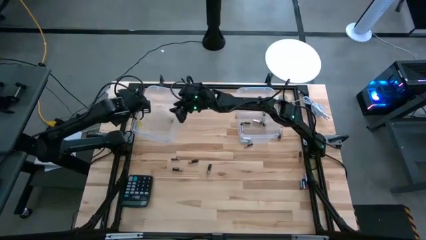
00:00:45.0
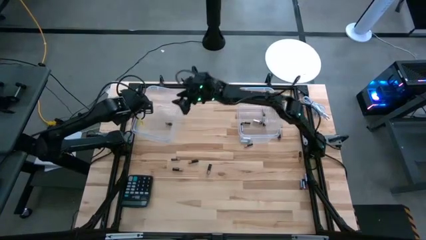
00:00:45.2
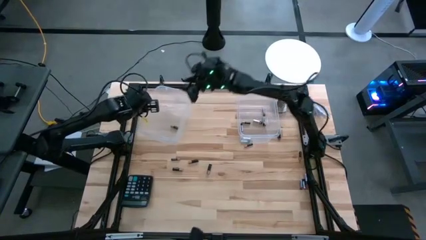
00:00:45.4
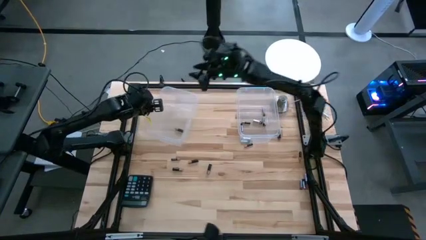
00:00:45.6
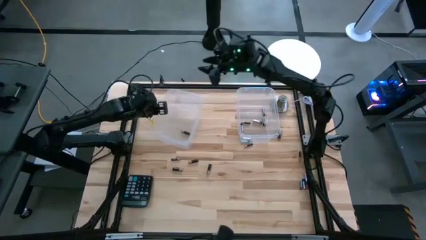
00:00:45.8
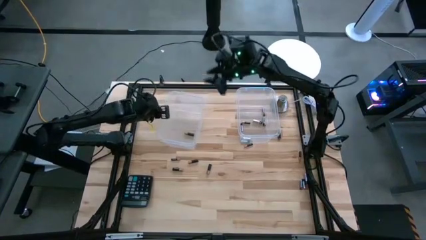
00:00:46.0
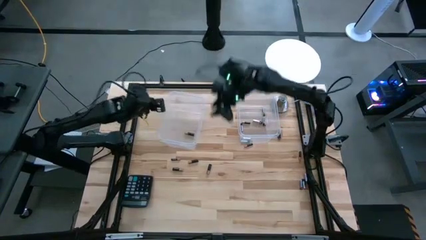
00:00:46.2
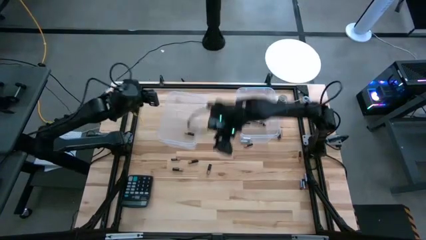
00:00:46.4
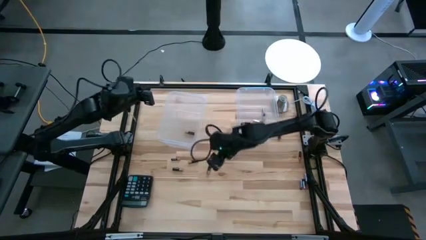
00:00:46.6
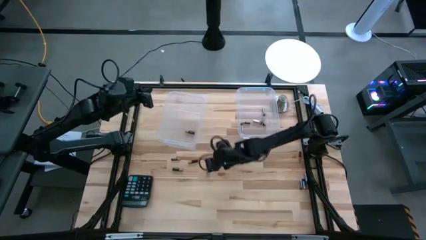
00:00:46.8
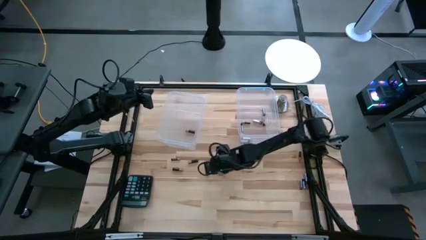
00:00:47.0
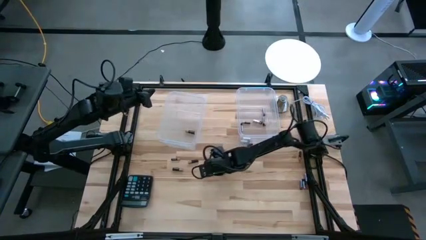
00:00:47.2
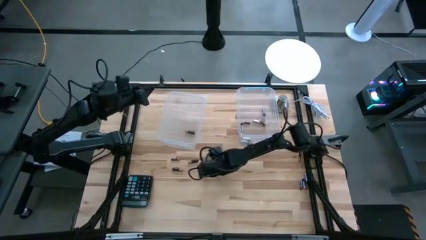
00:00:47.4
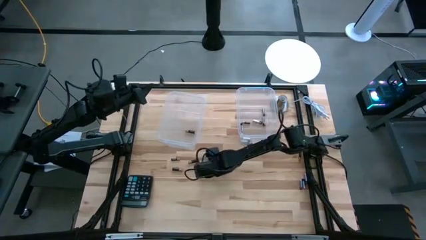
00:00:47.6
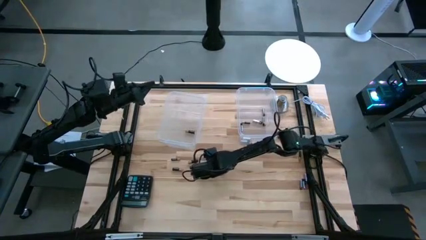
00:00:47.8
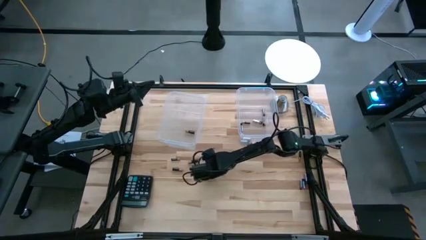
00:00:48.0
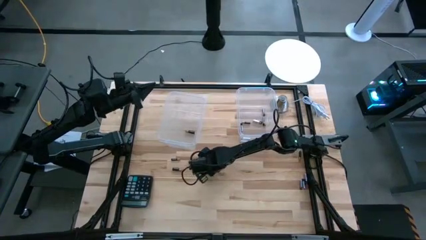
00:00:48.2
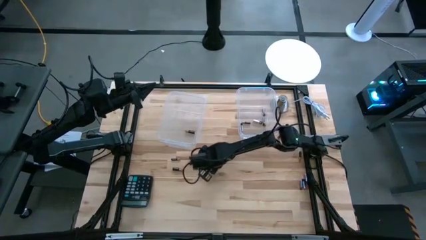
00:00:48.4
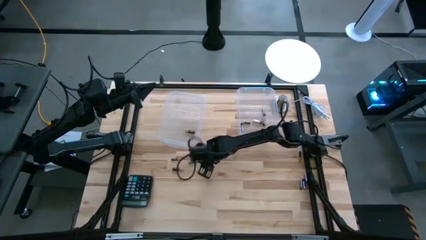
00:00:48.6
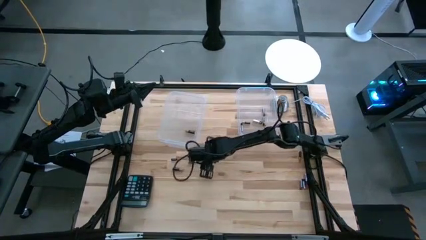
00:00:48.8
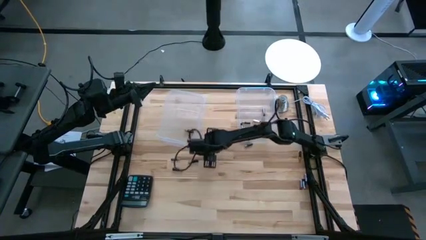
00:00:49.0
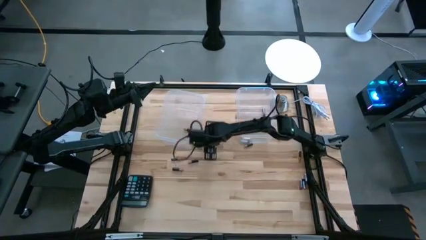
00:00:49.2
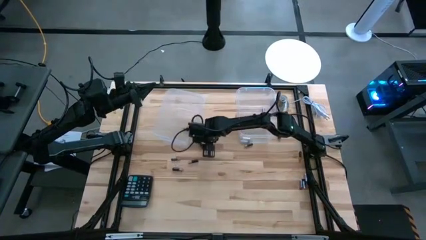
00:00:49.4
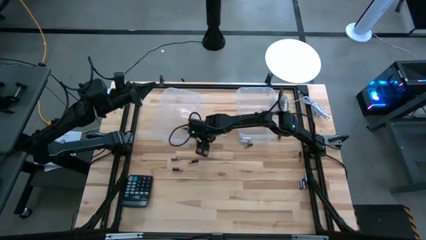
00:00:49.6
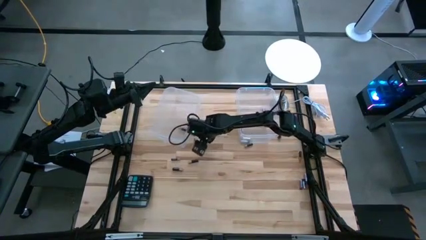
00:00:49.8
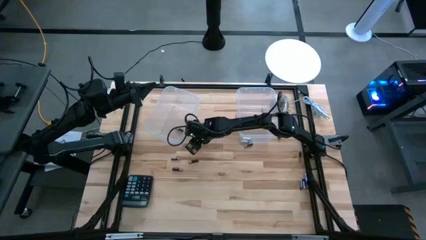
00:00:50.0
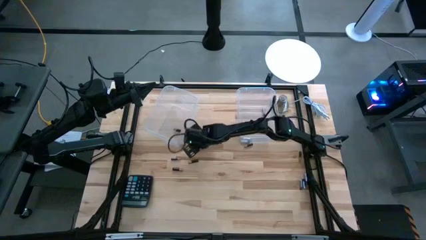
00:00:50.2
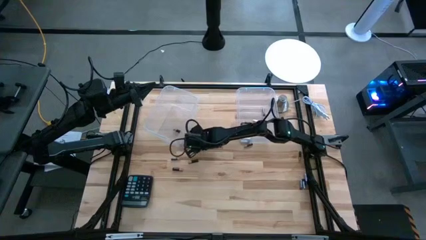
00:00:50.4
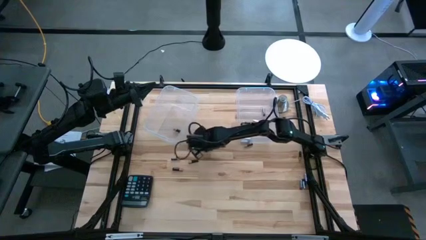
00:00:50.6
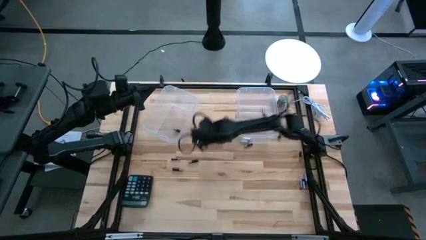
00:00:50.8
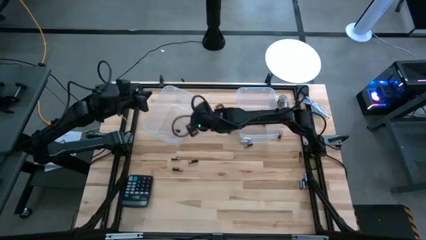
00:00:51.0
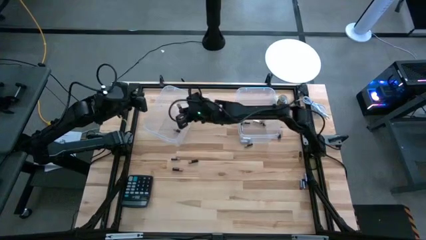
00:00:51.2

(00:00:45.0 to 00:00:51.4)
Task: Sort batteries
Put black battery into the left transparent bin

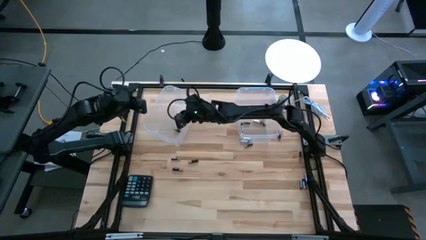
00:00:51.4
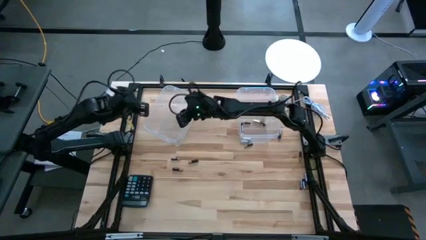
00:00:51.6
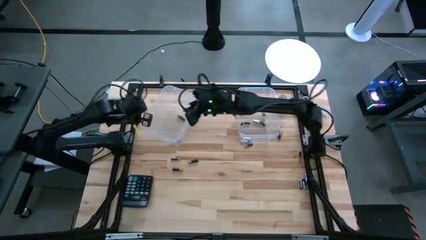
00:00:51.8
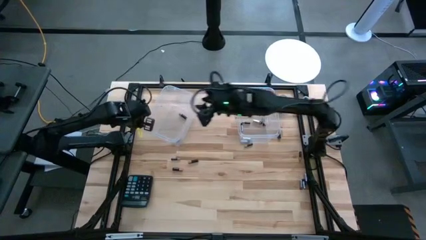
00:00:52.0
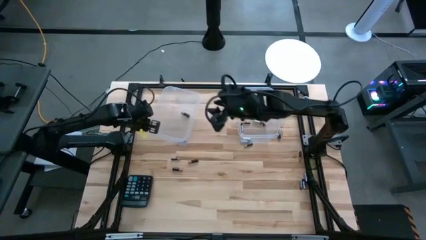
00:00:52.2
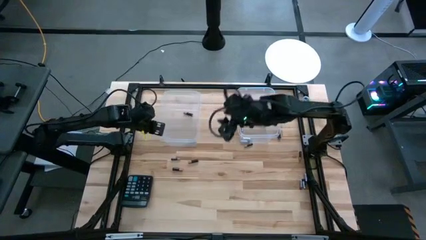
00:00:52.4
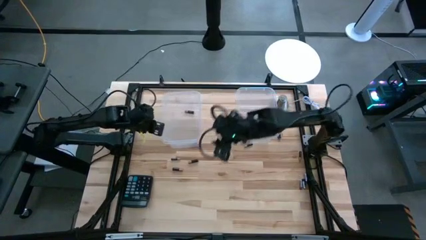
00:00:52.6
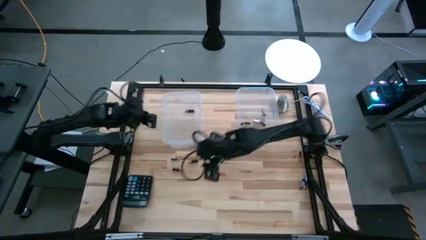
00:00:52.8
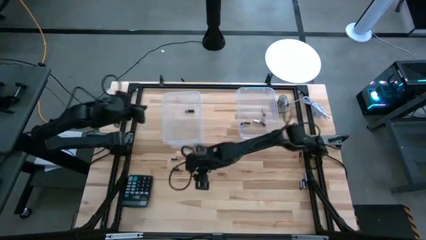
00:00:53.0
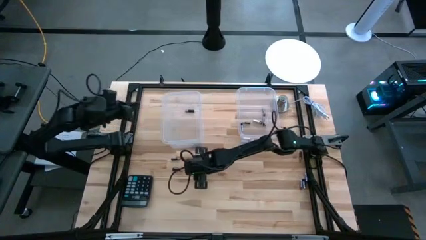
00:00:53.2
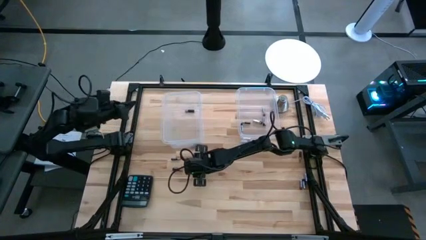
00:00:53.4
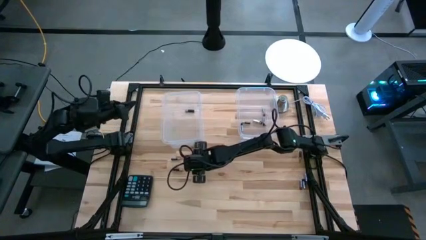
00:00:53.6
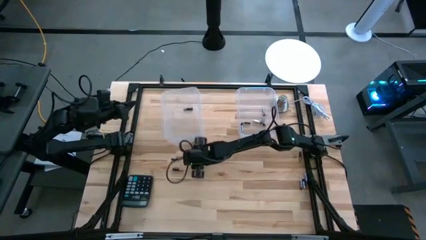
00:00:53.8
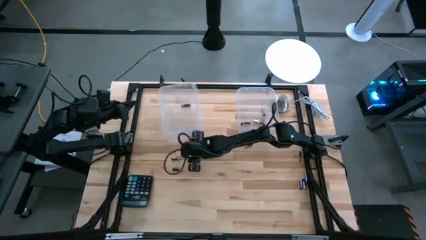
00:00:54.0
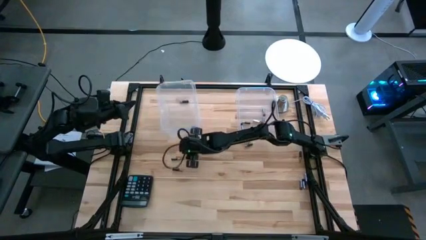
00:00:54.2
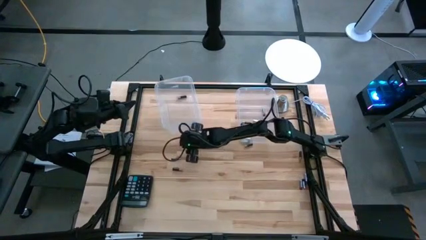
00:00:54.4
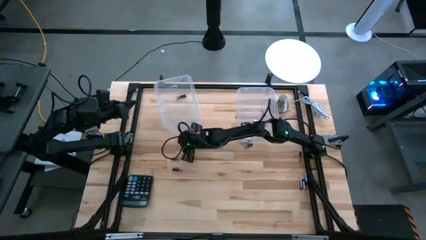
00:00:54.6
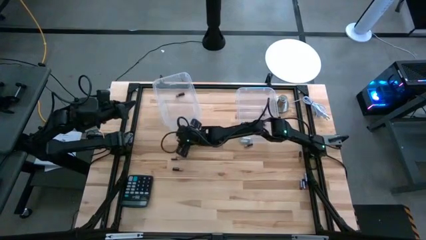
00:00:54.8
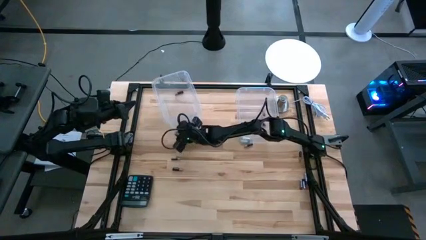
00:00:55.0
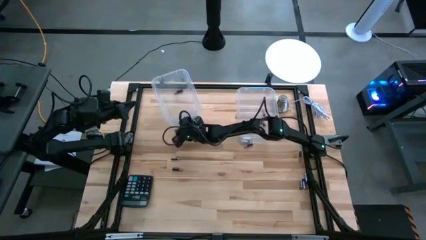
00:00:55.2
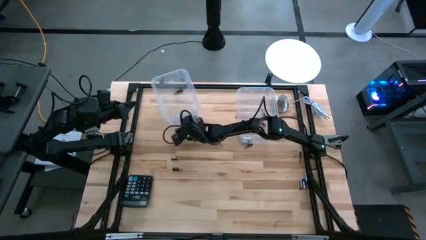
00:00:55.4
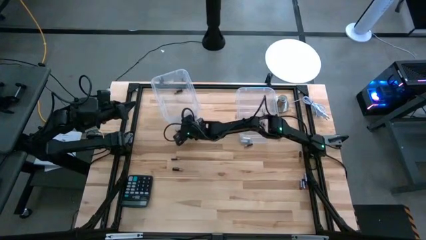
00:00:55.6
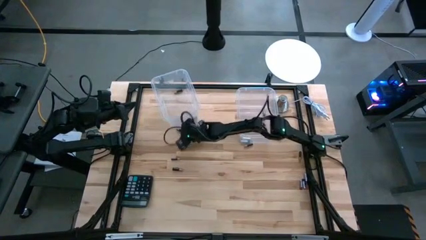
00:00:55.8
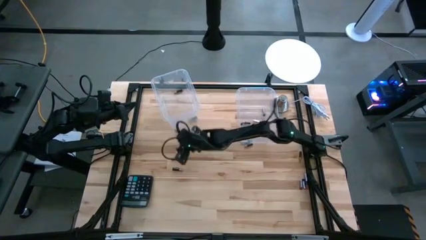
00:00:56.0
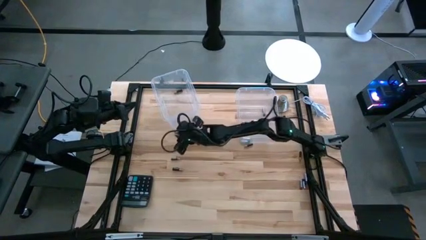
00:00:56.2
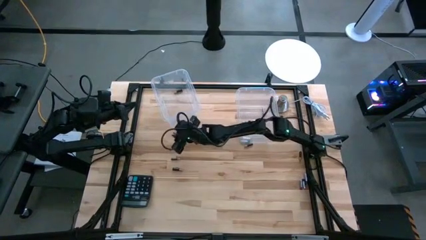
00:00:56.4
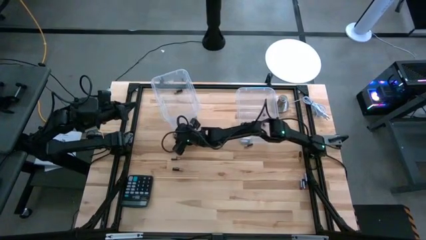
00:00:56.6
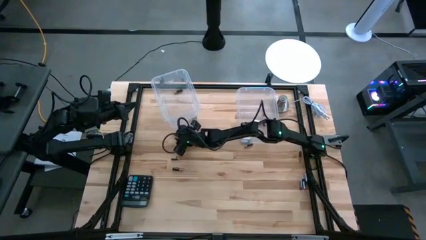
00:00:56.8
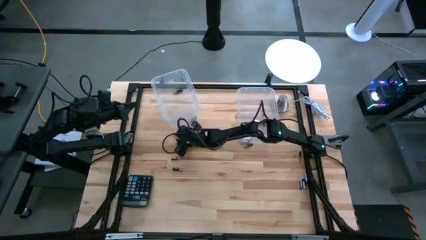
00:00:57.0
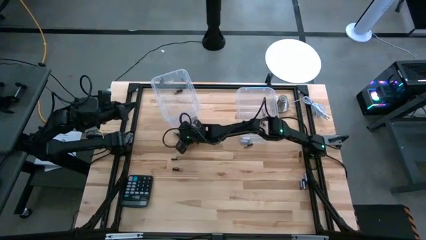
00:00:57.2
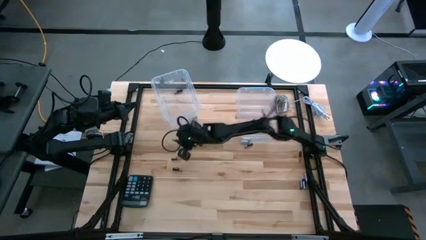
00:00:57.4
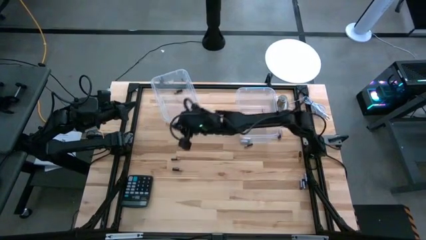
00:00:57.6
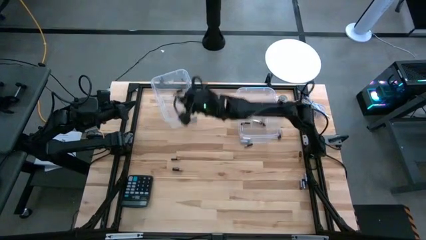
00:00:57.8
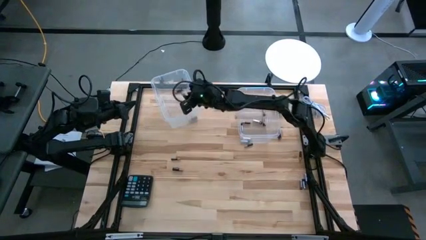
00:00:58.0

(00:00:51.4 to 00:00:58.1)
Put black battery into the left transparent bin

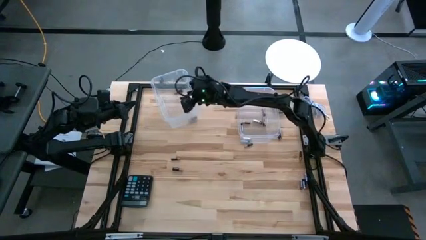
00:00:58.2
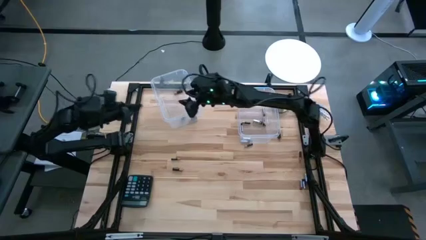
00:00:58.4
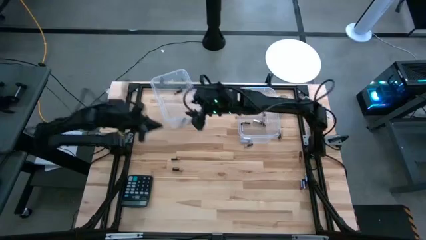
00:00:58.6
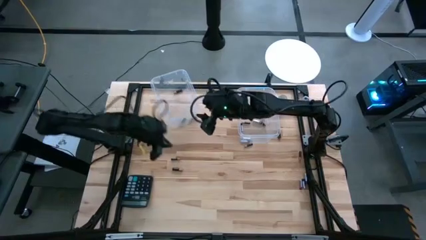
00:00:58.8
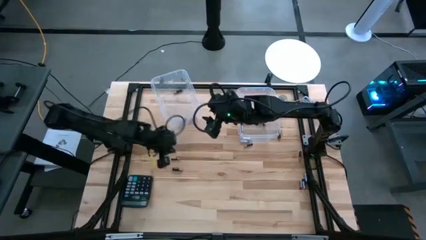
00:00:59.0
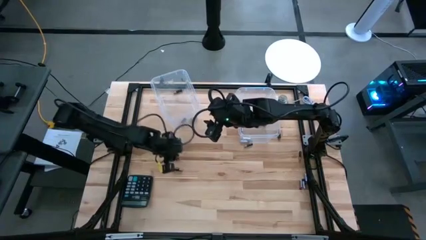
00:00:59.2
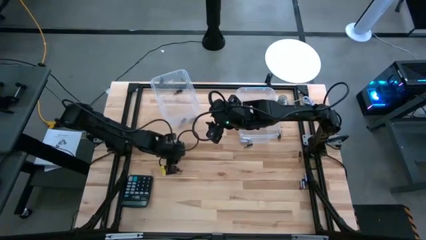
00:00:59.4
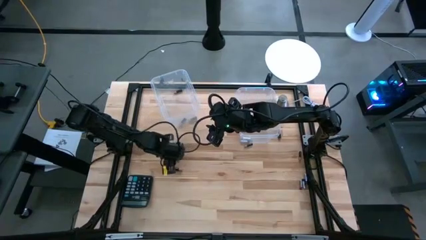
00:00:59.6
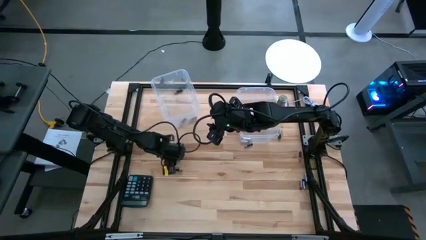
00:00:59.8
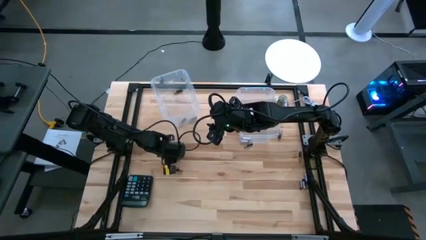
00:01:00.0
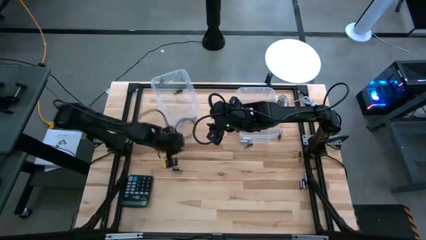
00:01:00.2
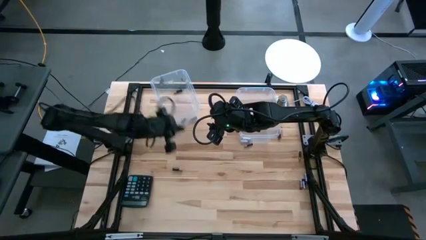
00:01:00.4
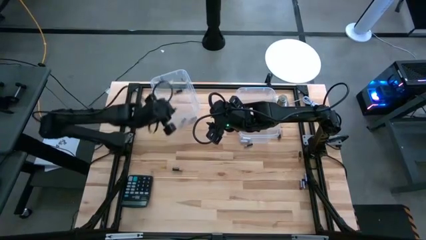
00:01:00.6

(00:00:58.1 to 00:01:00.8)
Put black battery into the left transparent bin

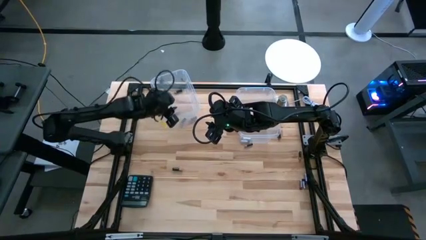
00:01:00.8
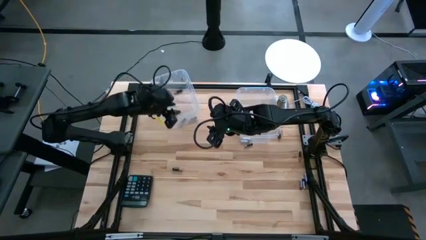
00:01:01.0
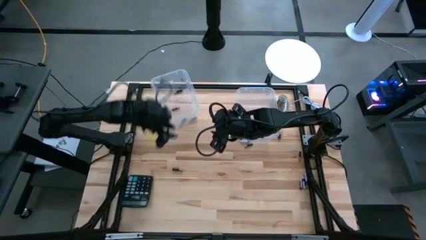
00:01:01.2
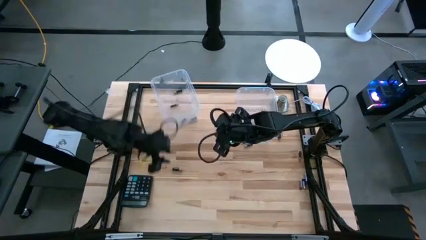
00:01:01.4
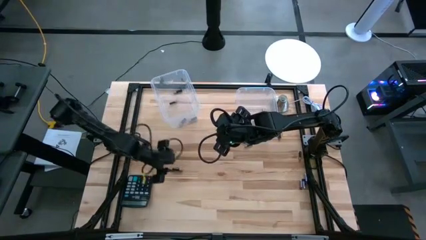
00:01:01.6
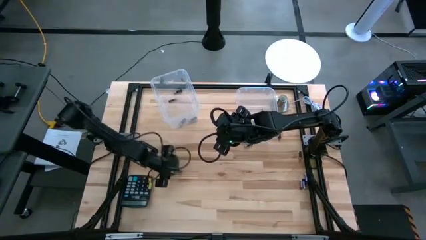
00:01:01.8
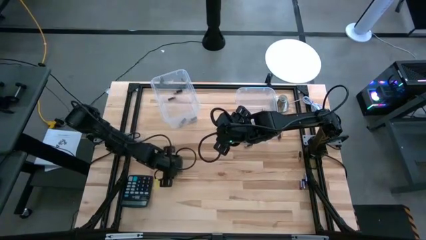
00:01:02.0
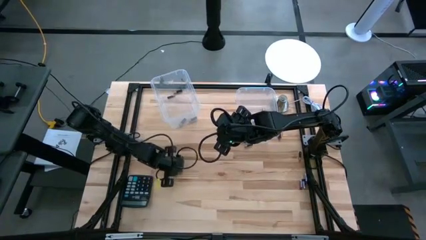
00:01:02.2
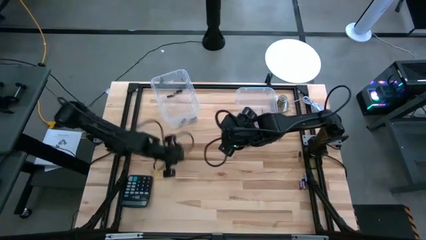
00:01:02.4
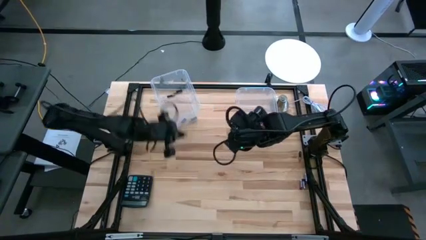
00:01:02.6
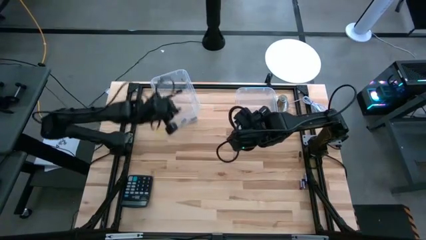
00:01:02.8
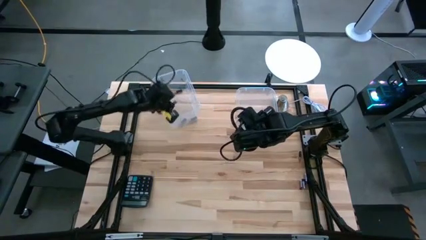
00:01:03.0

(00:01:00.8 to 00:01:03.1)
Put black battery into the left transparent bin
